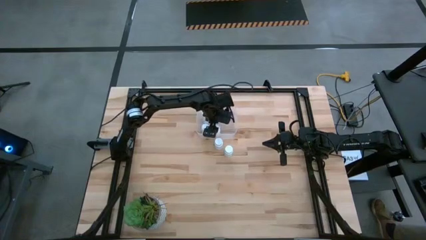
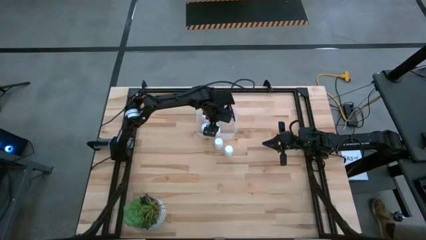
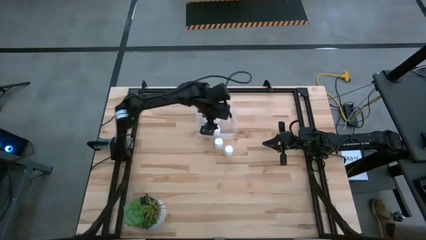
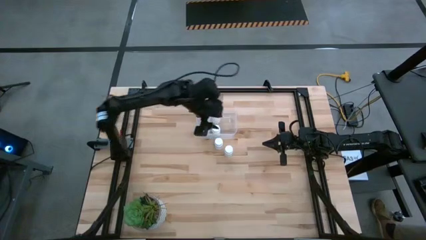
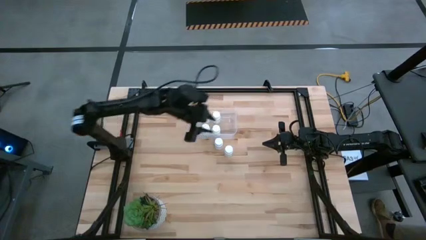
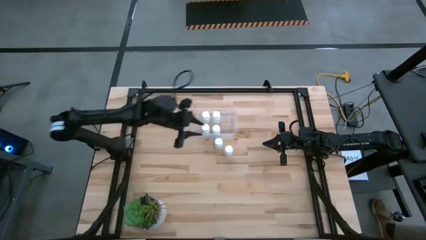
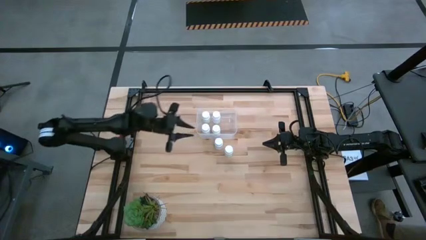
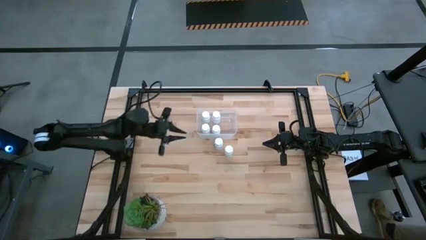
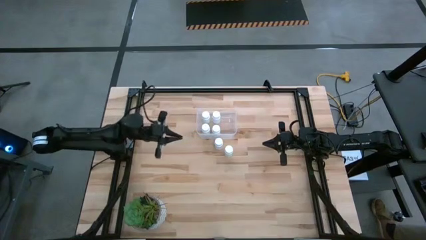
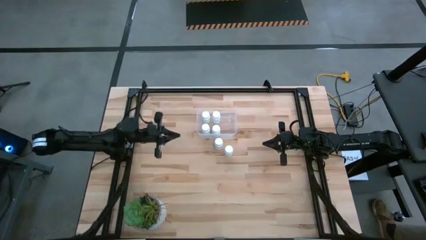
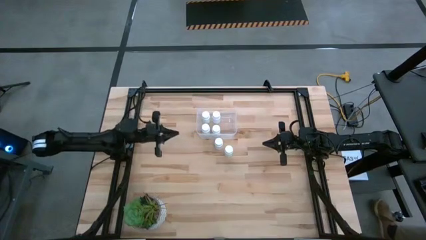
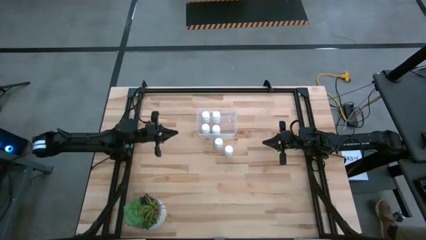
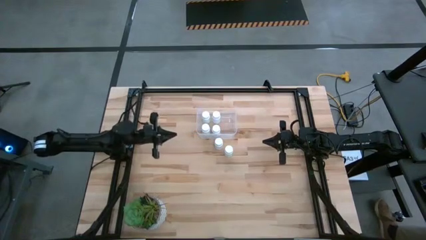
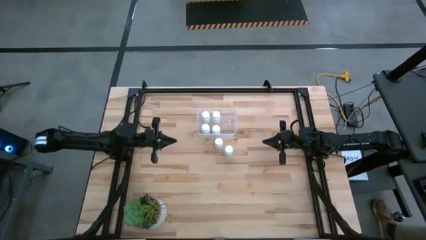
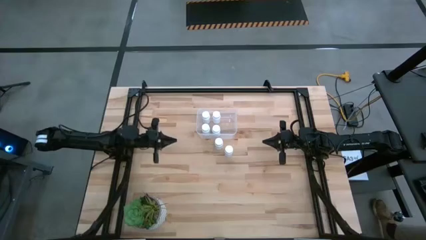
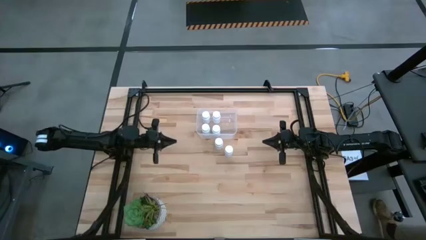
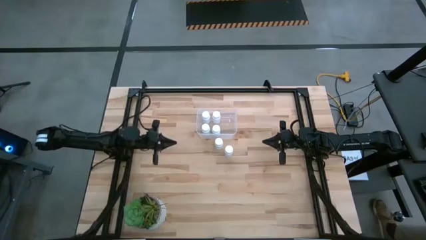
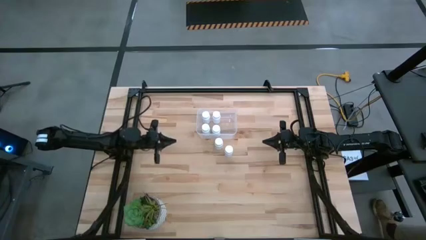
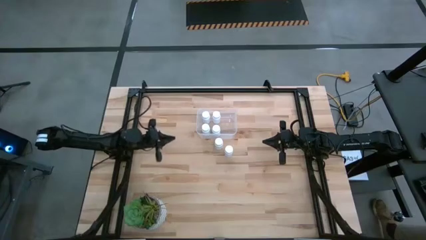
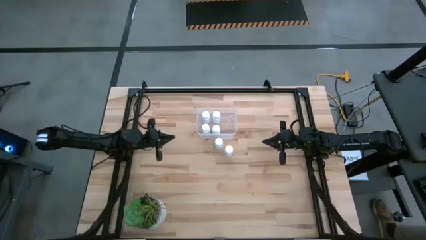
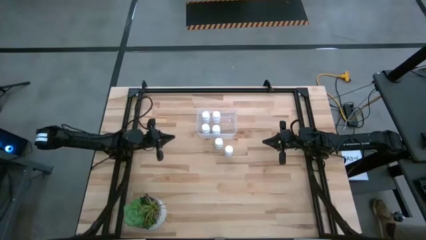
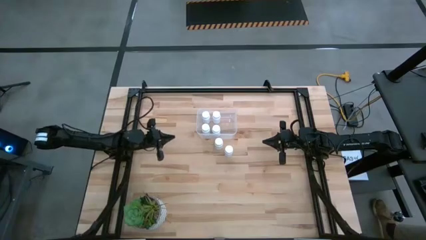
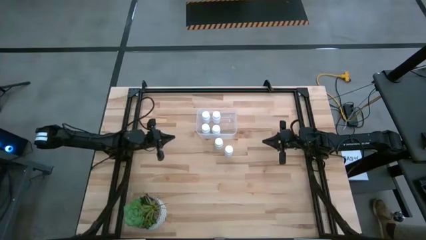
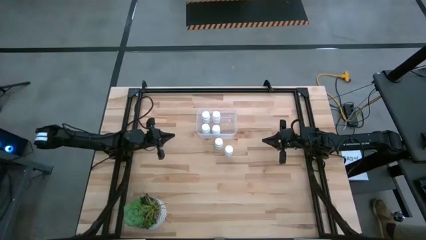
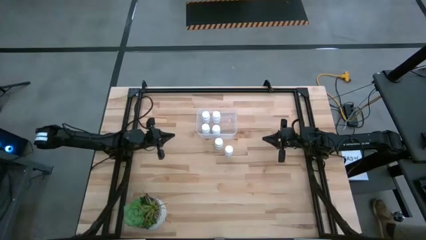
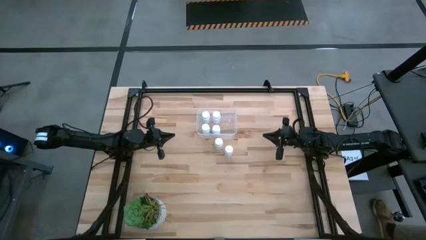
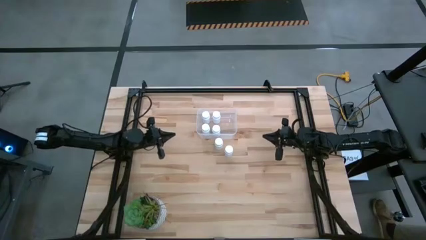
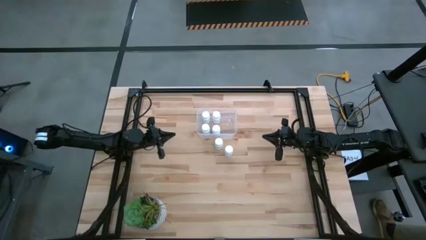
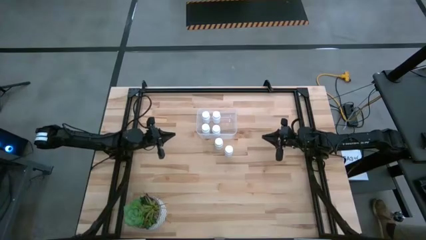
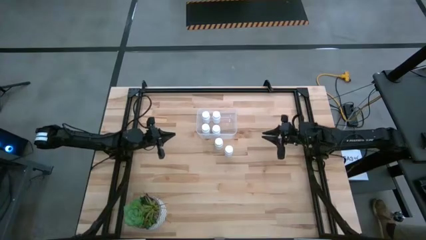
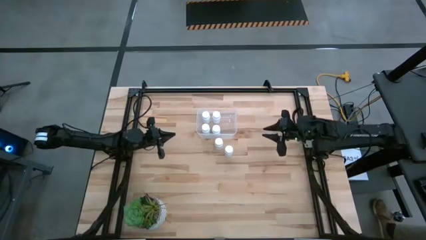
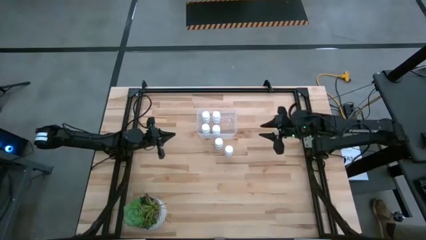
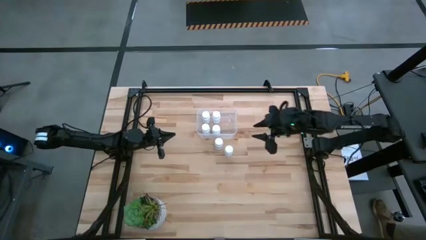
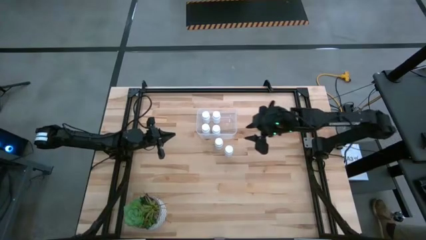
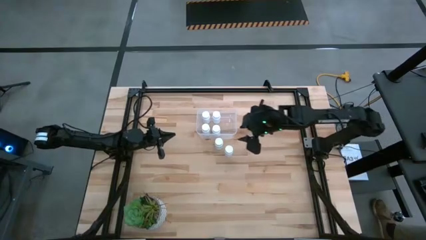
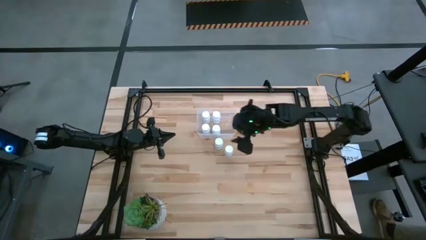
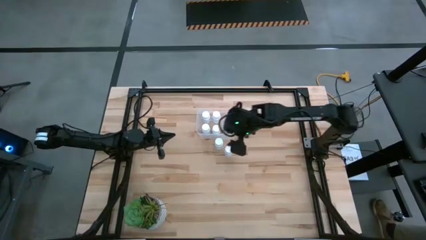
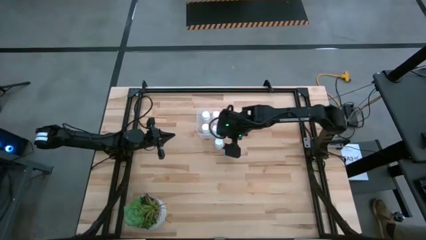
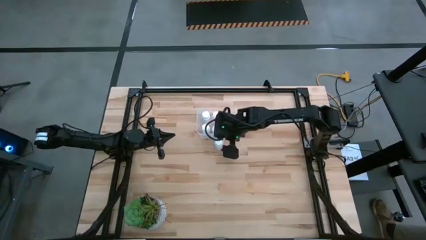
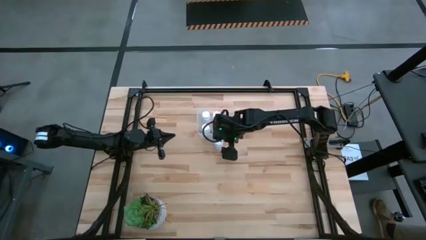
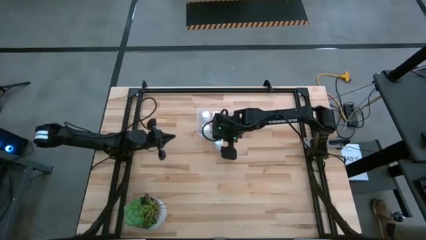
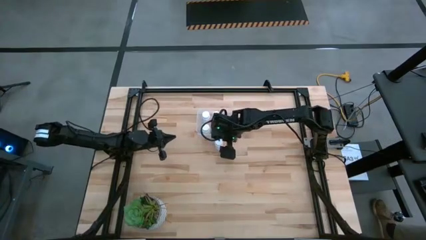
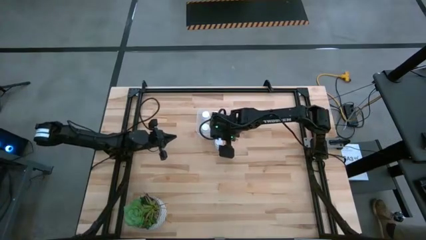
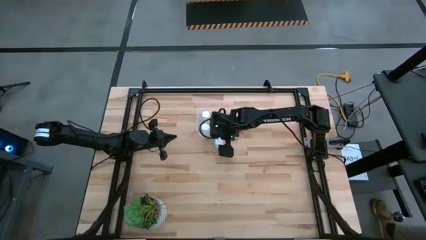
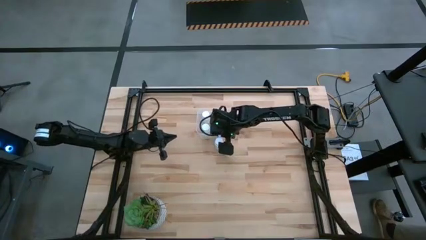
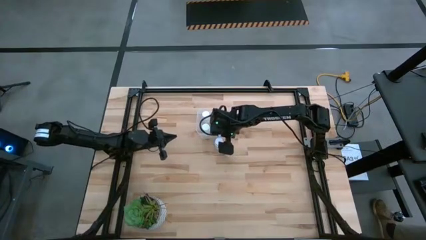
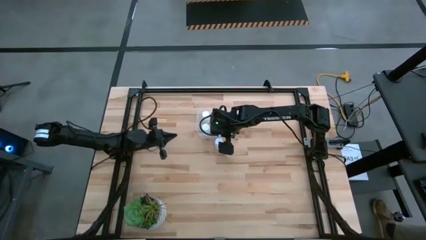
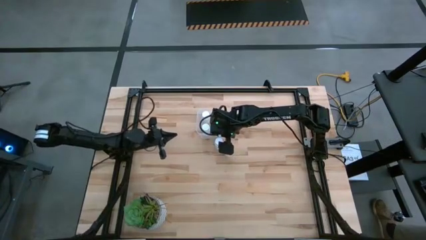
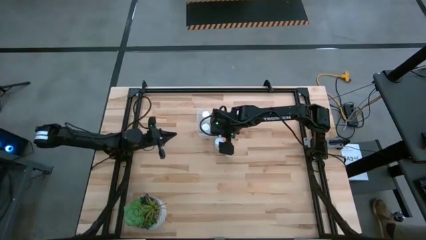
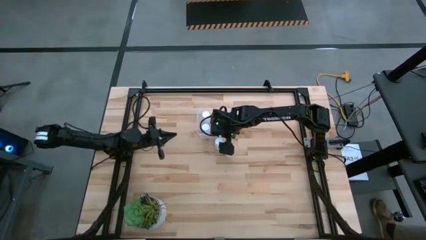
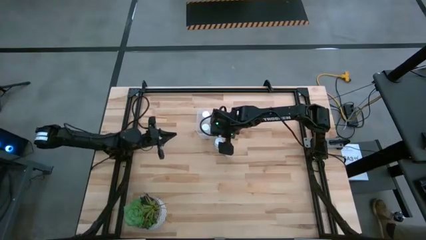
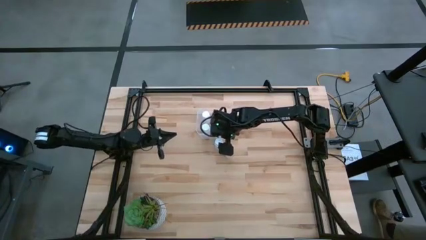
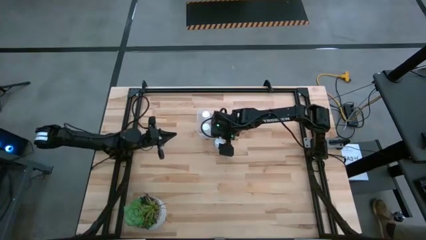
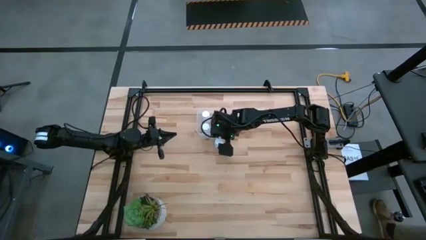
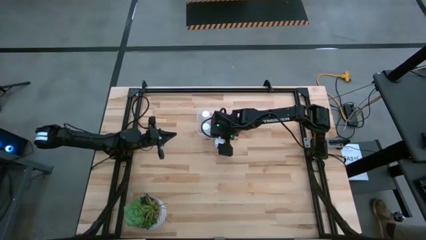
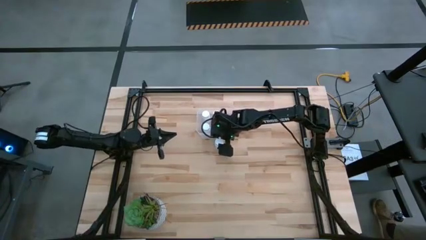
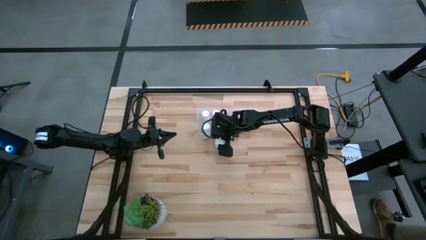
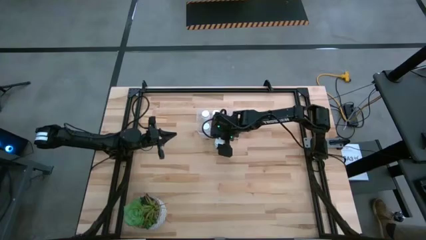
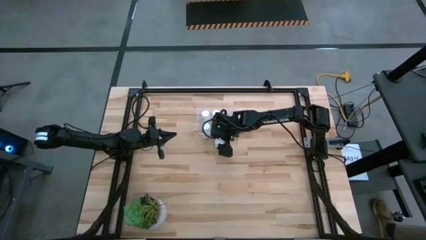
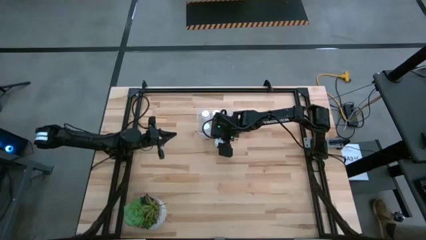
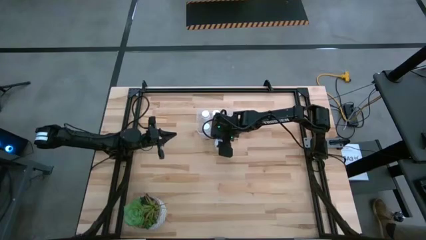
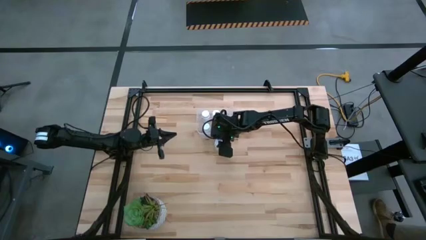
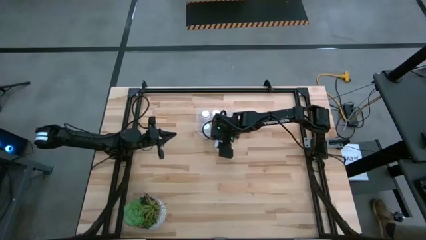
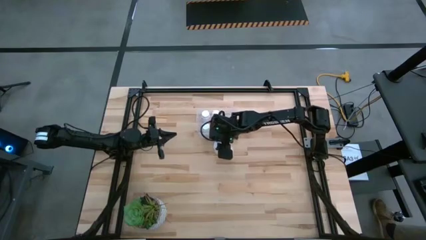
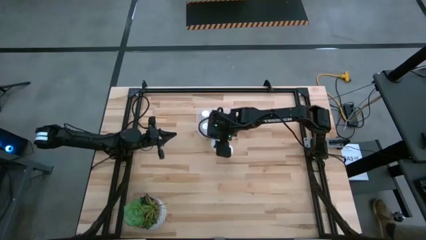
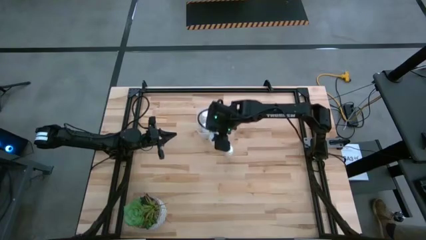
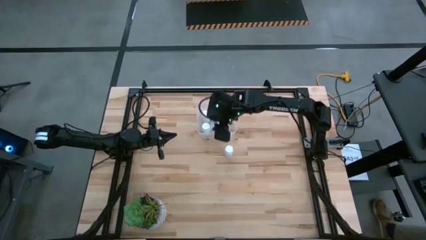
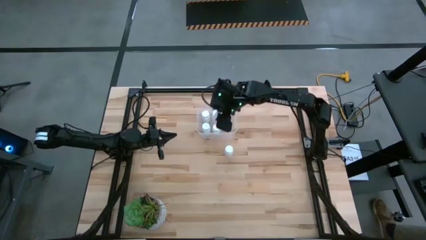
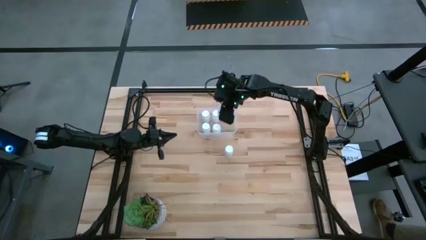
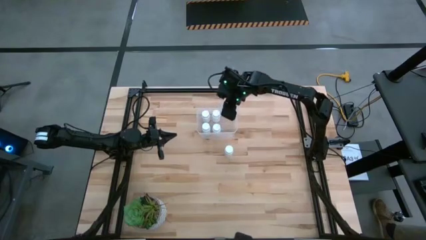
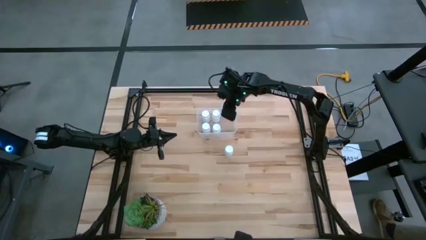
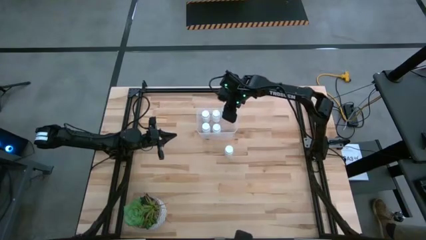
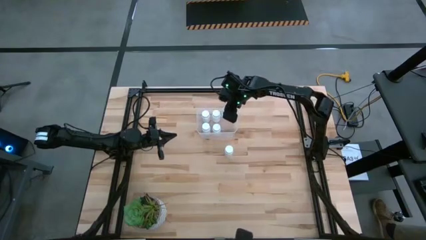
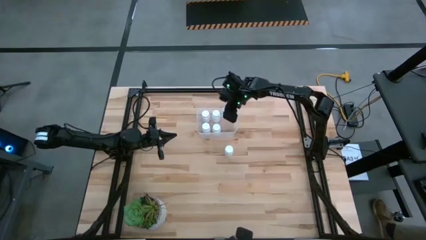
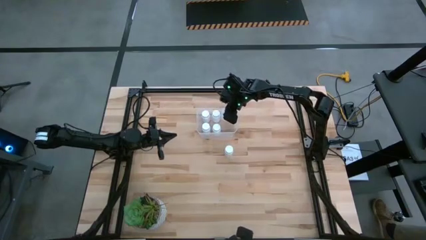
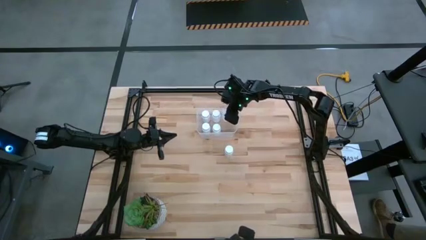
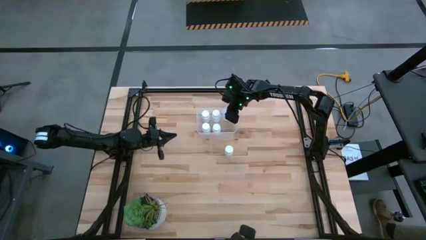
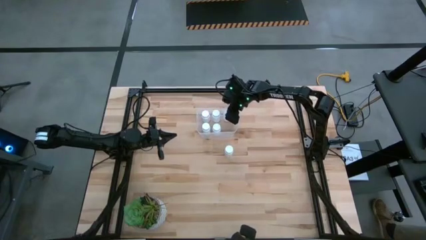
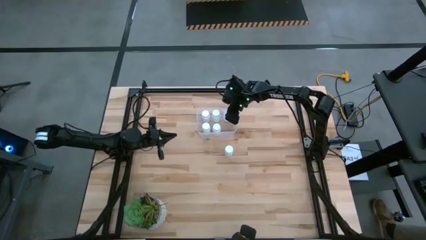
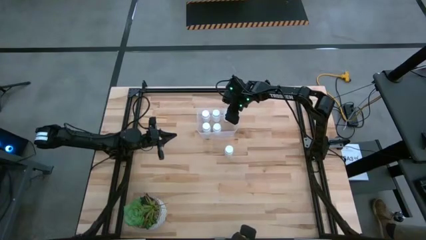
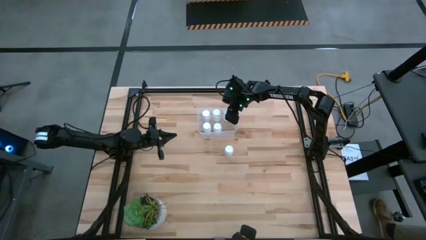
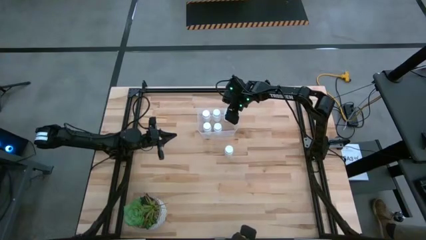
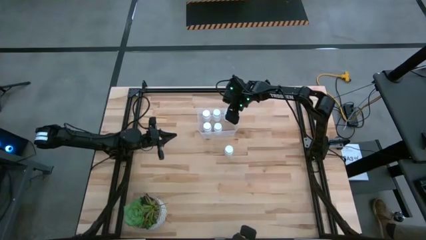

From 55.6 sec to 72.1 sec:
Task: Pick and place pill bottles into a basket
Put the top white pill bottle into the transparent bin
